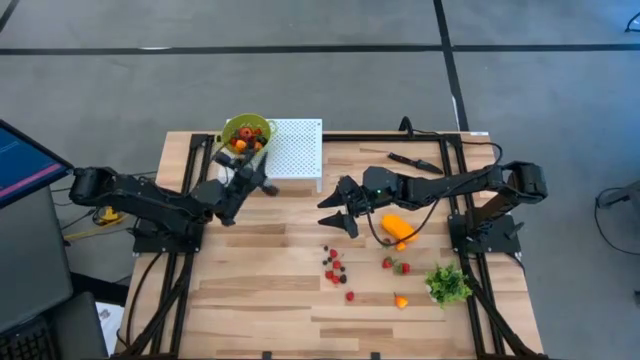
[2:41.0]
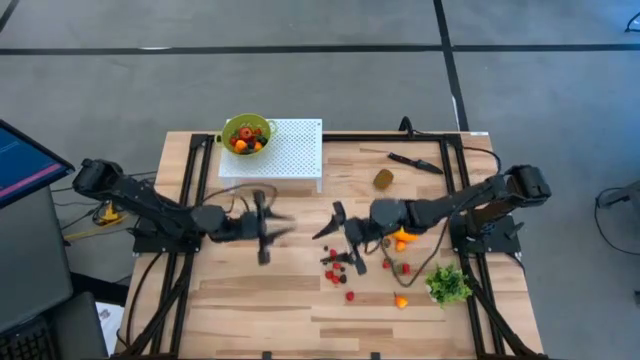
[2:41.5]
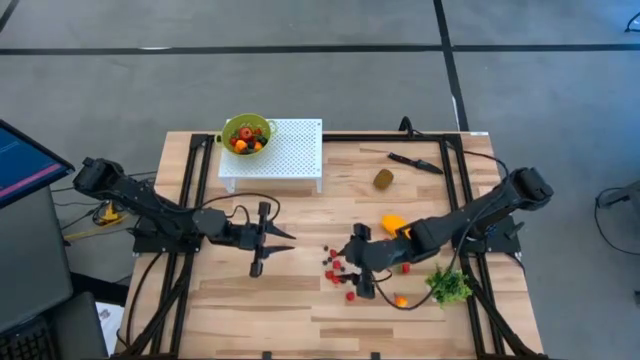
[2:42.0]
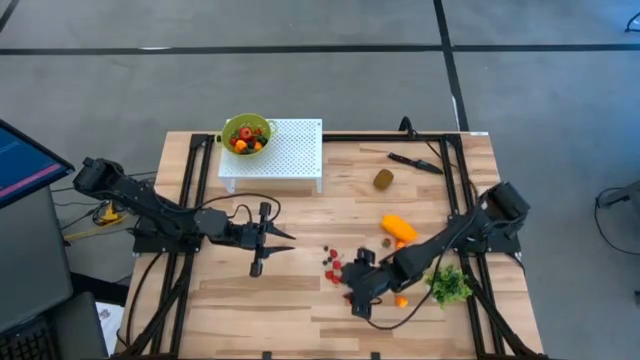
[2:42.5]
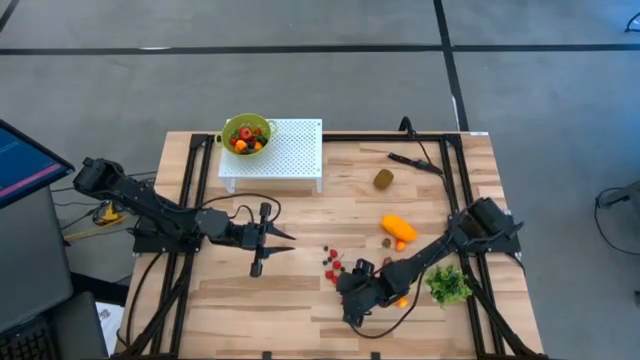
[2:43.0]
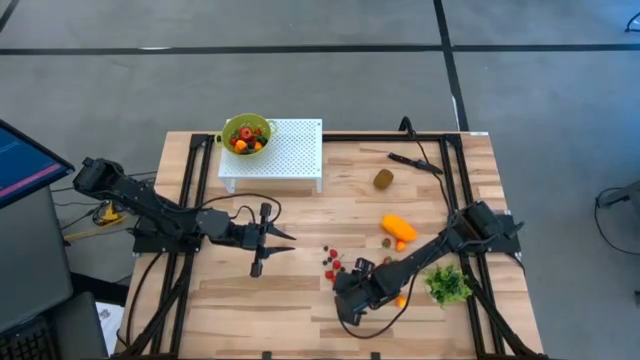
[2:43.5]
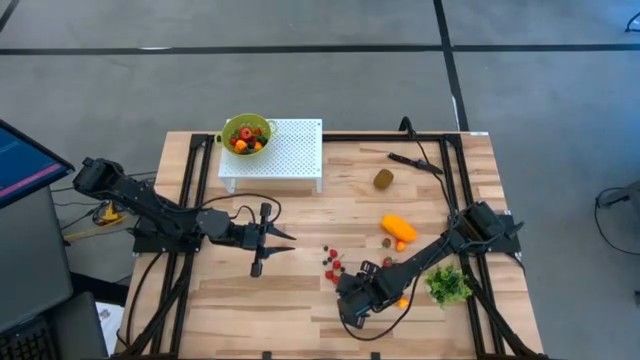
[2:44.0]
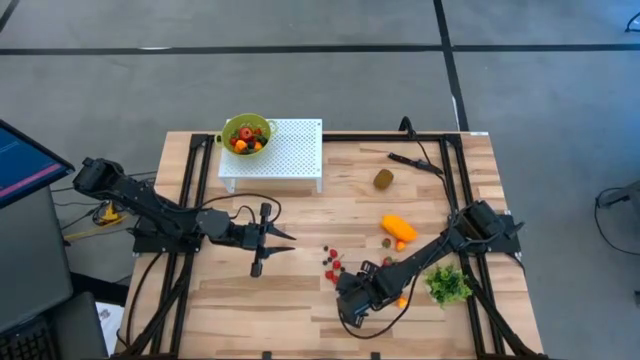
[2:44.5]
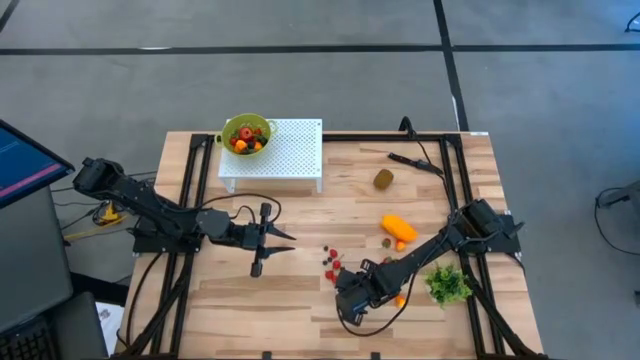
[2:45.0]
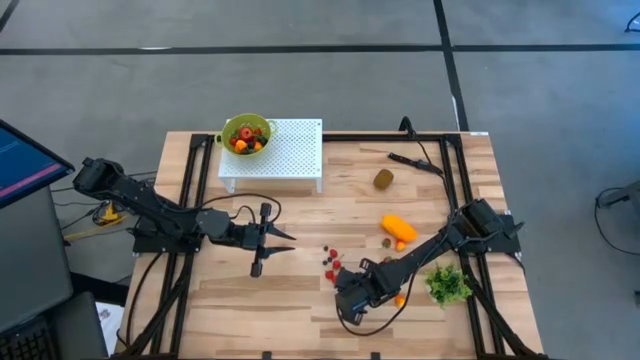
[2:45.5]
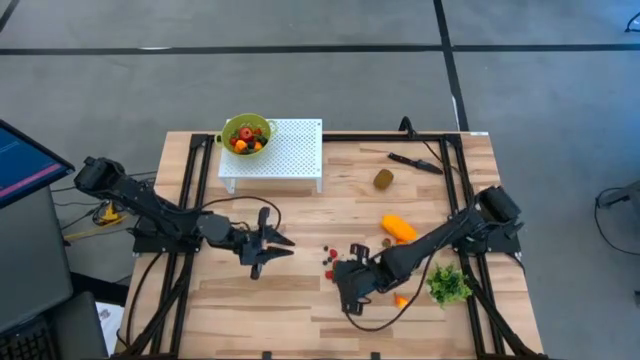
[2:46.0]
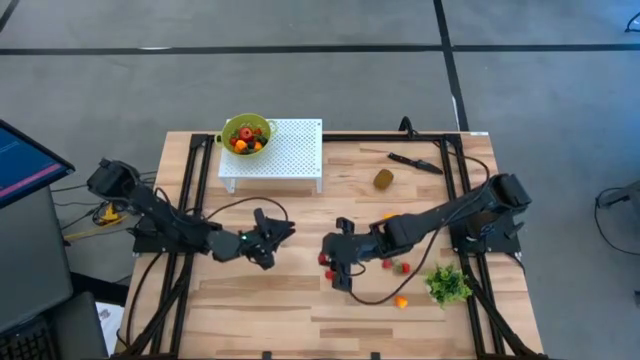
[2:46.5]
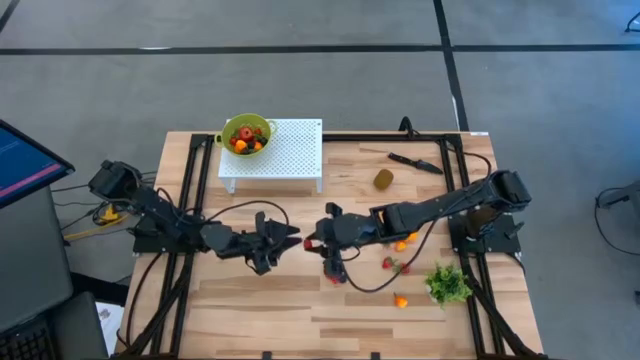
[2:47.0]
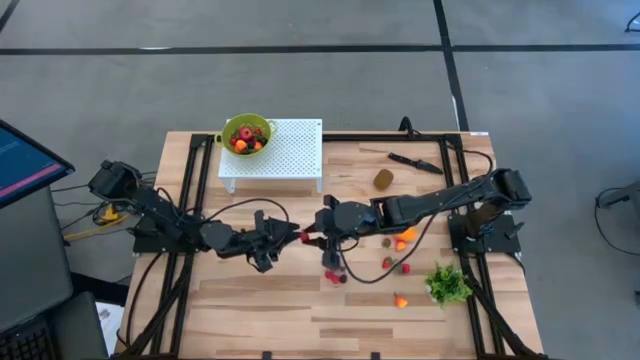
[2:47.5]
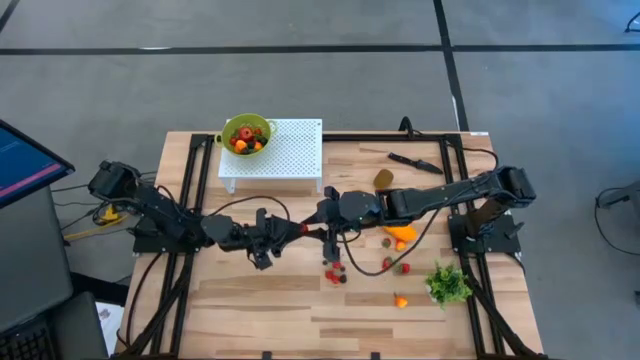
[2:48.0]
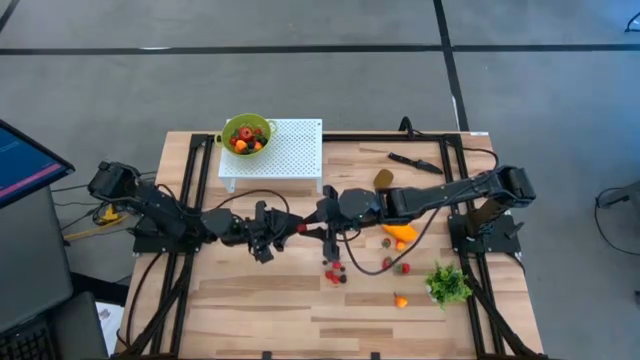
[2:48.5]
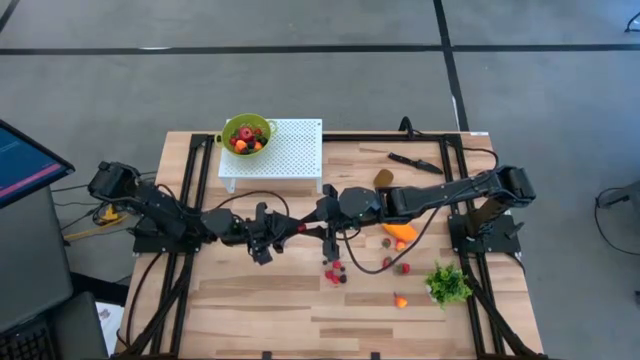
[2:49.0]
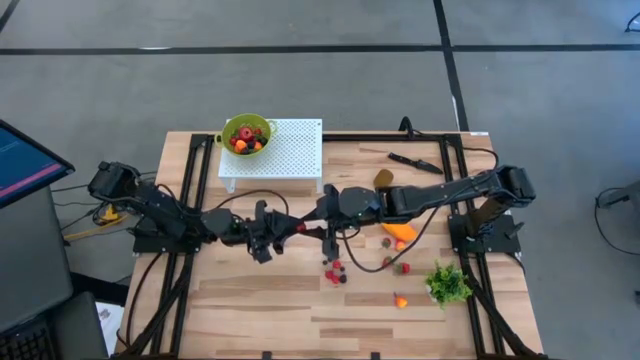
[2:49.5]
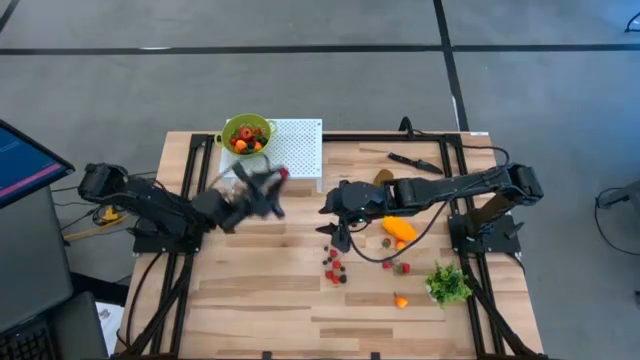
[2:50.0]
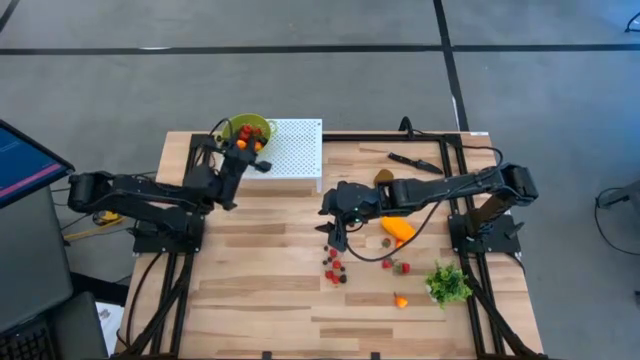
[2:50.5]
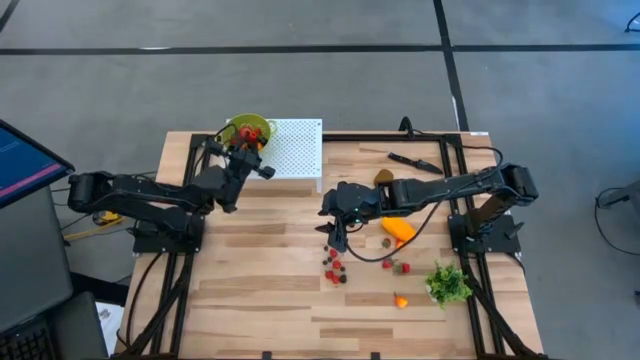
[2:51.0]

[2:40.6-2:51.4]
Task: Pick & Place Fruit
Put the raspberry into the green strainer bowl on the shelf

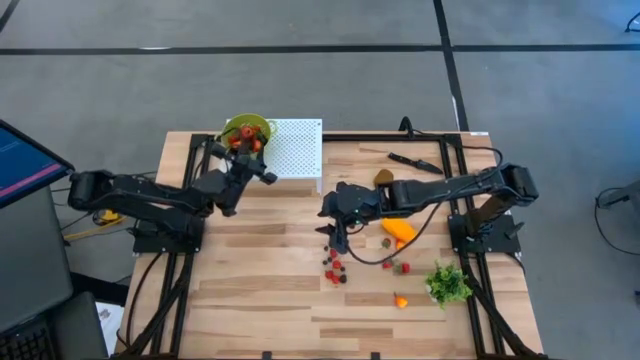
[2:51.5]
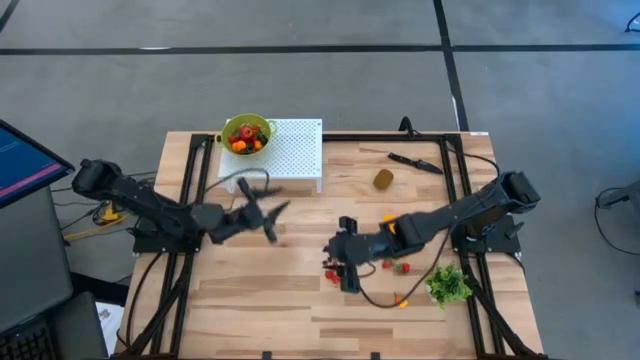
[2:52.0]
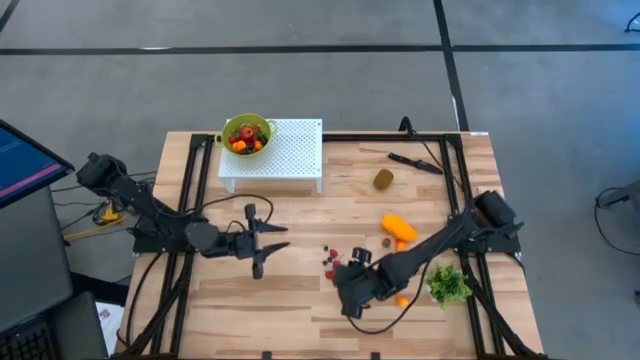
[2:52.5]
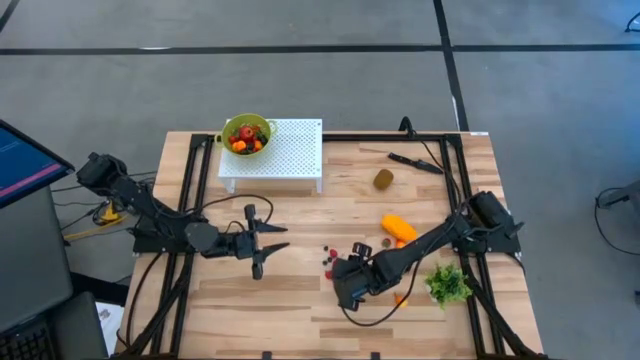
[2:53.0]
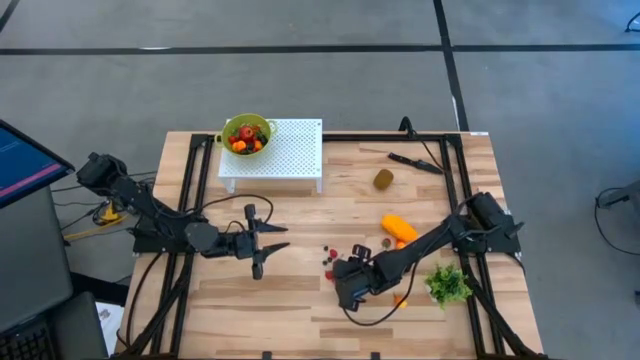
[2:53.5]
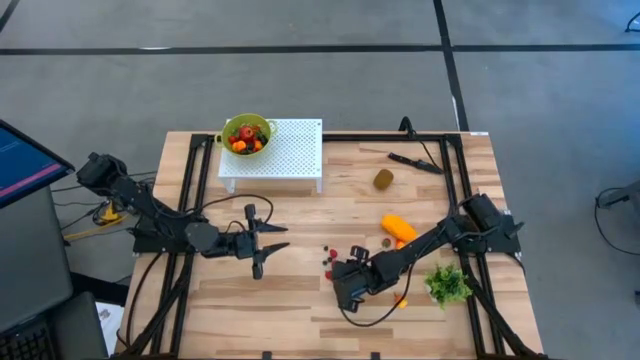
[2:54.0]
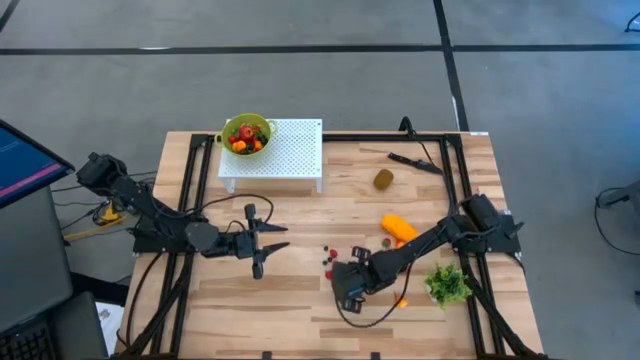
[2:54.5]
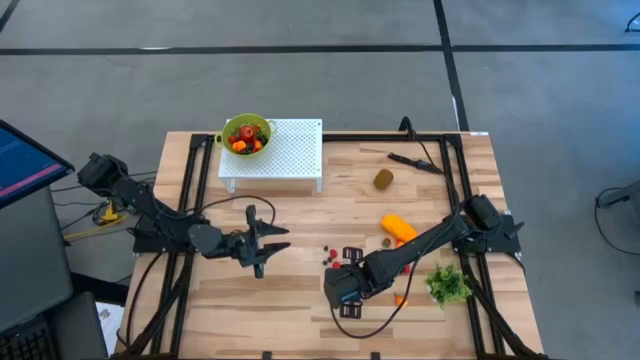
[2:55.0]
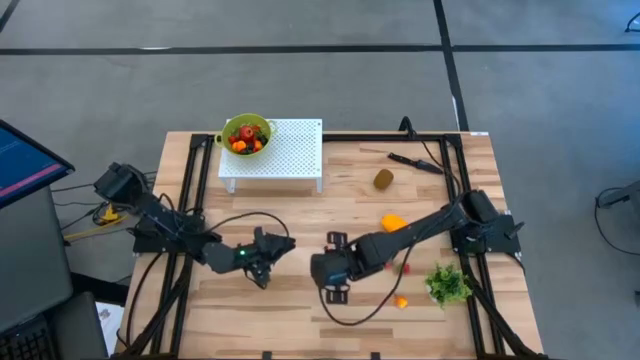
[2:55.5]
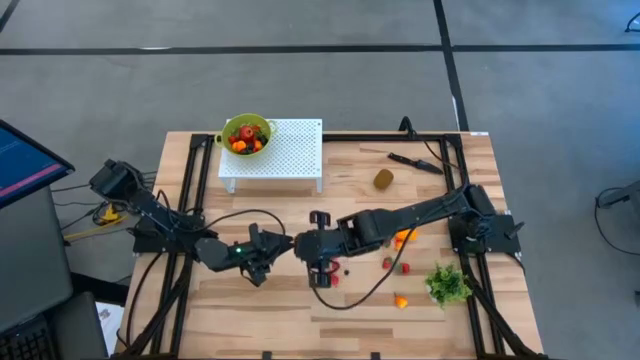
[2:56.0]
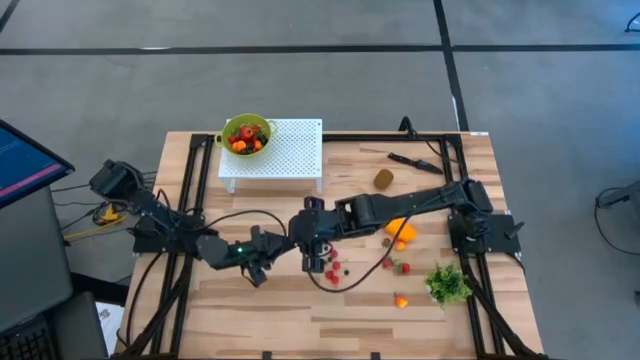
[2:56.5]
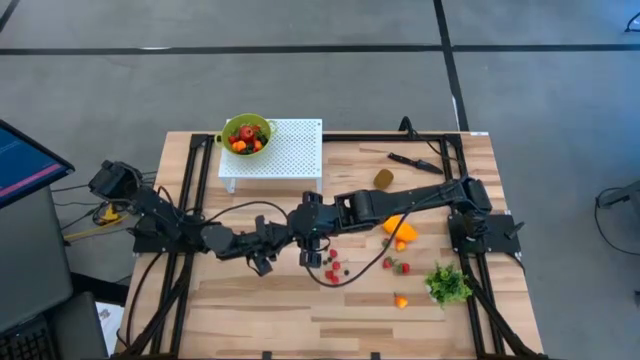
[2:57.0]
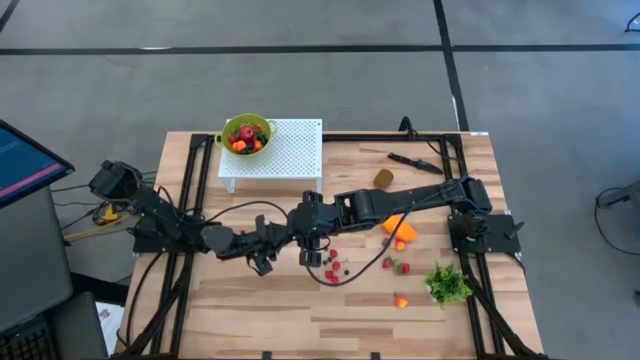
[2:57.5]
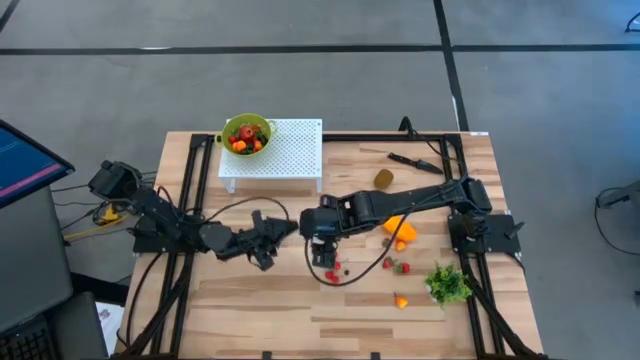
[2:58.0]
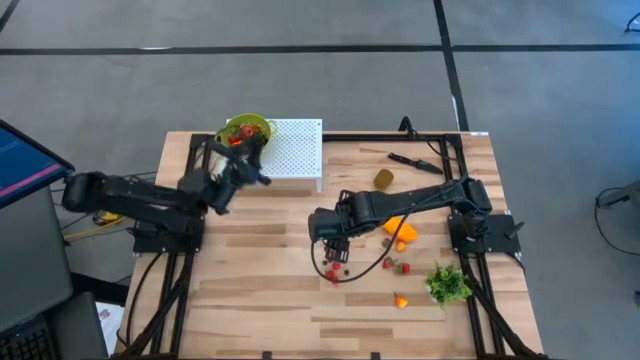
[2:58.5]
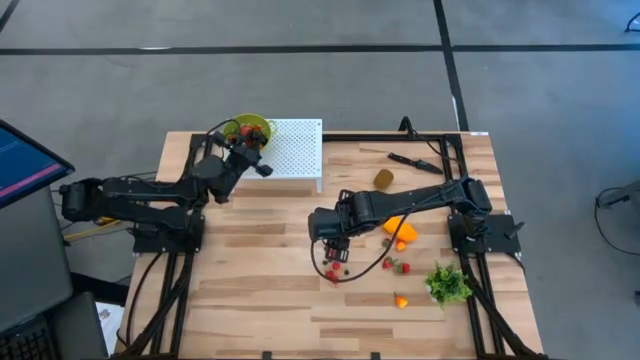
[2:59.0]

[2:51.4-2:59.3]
Put the blackberry into the green strainer bowl on the shelf

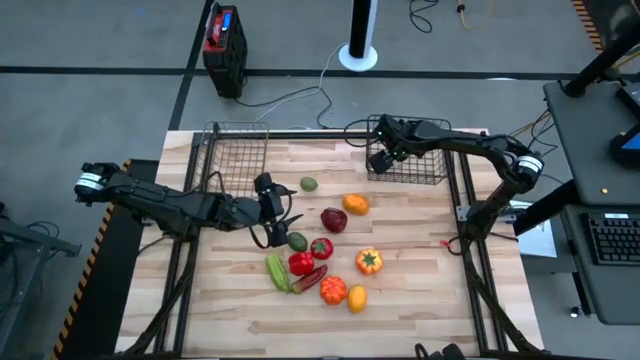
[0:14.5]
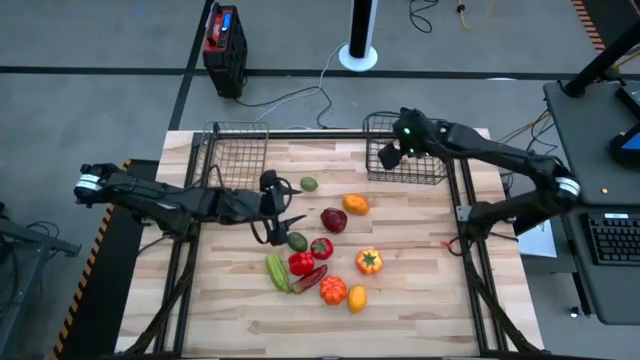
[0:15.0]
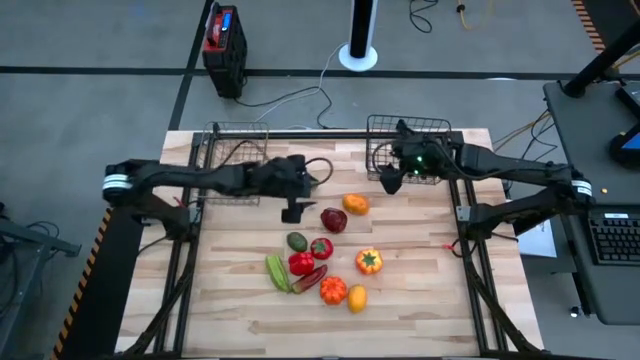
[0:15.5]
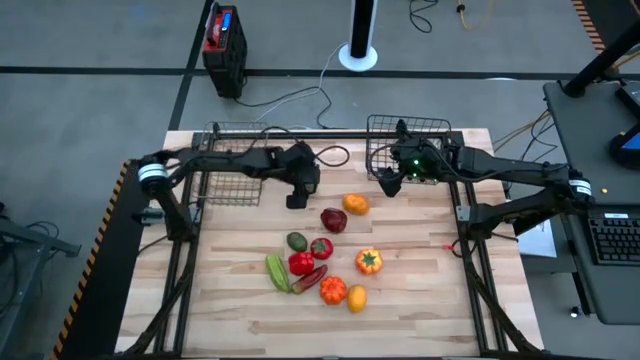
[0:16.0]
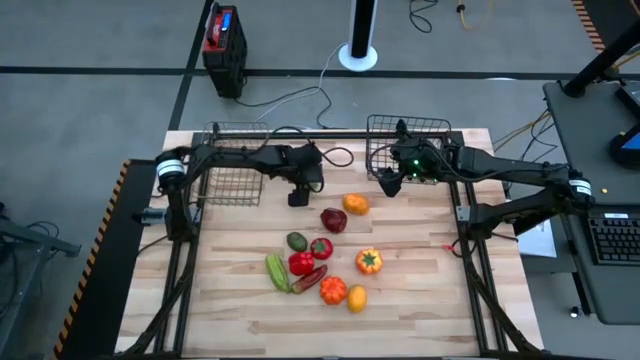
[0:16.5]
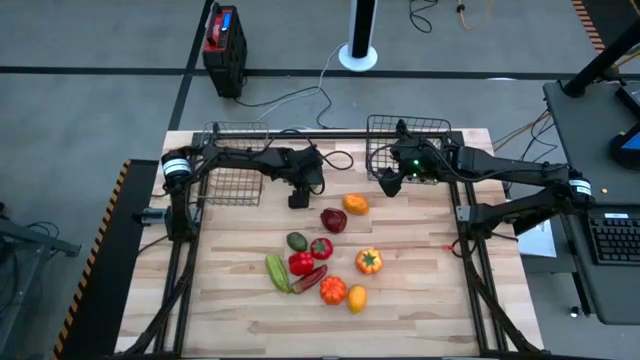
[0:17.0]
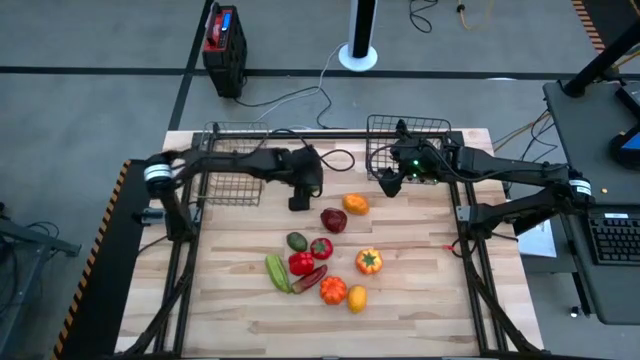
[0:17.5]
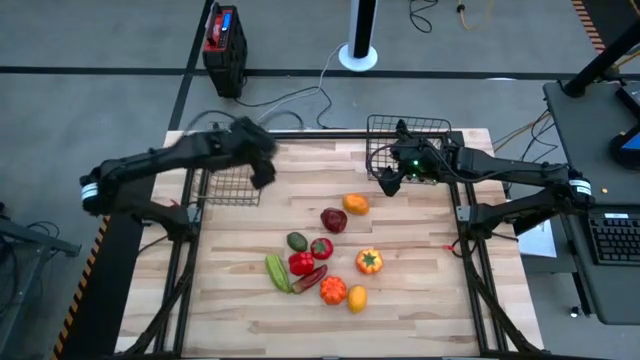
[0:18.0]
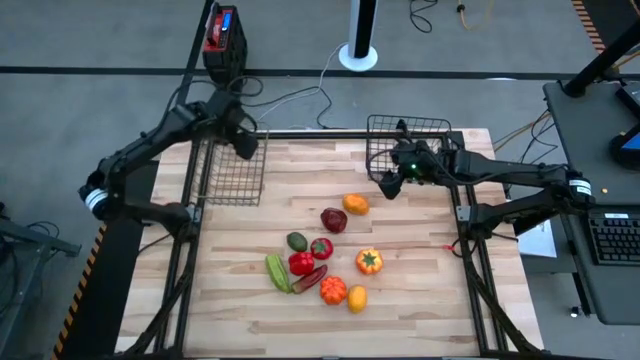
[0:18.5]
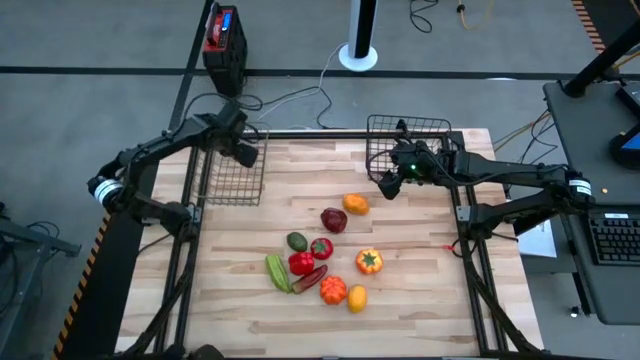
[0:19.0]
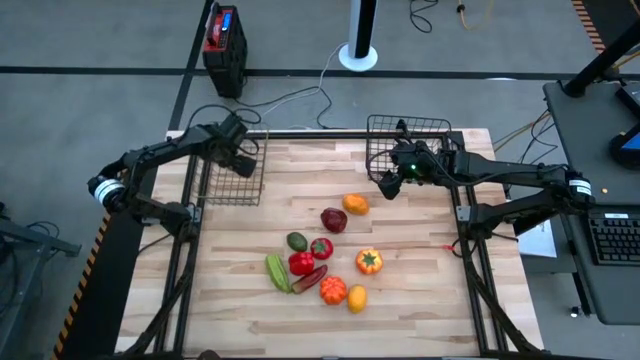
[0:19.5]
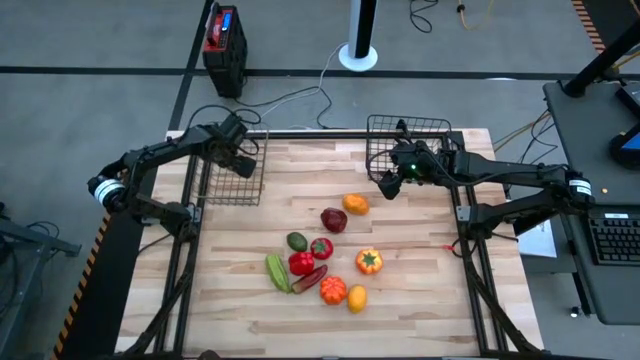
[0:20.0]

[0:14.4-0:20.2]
Task: Sort produce into baskets
Put the top lime into the brown wire basket
